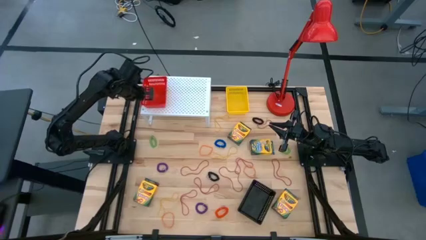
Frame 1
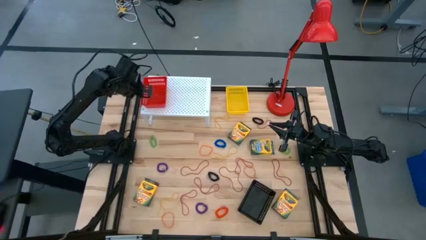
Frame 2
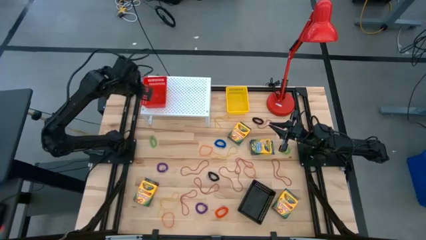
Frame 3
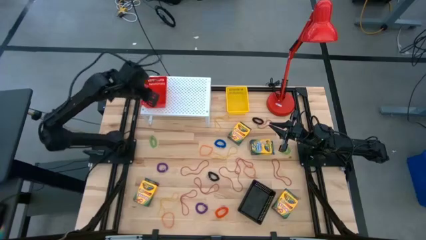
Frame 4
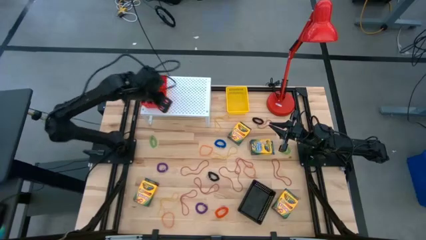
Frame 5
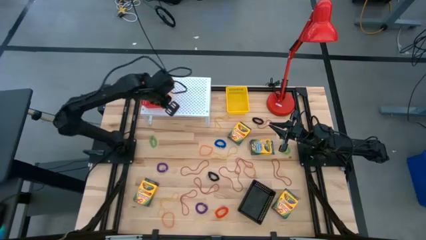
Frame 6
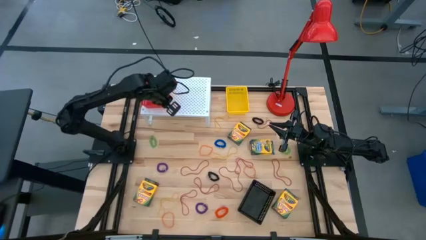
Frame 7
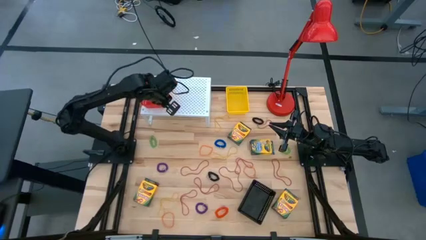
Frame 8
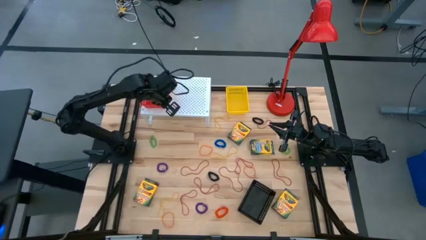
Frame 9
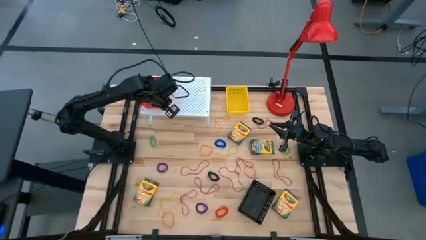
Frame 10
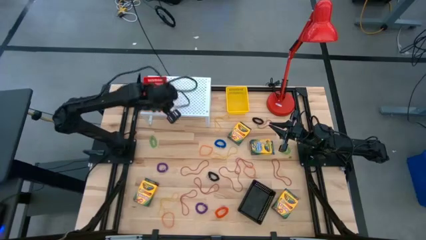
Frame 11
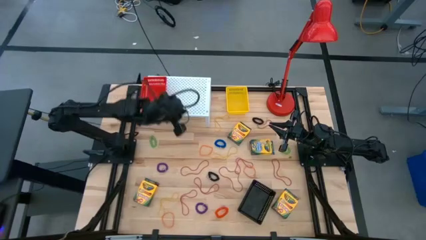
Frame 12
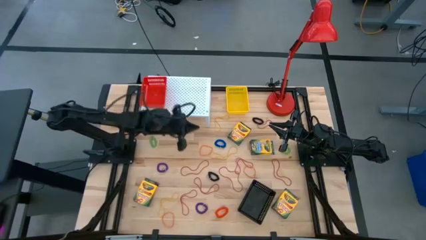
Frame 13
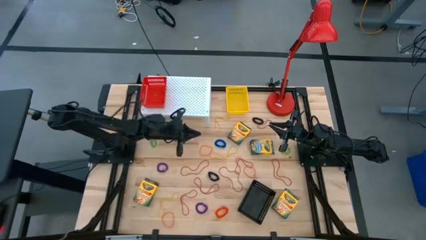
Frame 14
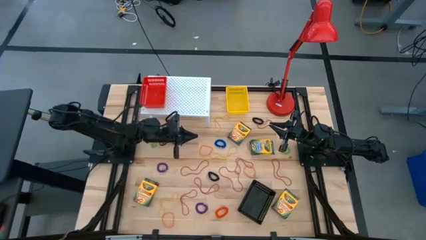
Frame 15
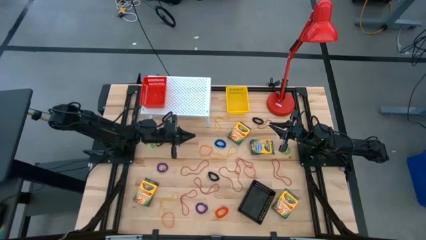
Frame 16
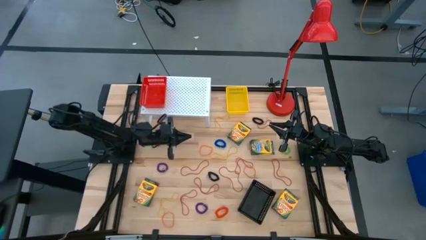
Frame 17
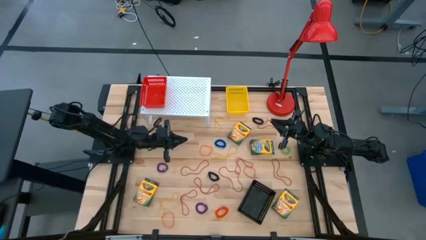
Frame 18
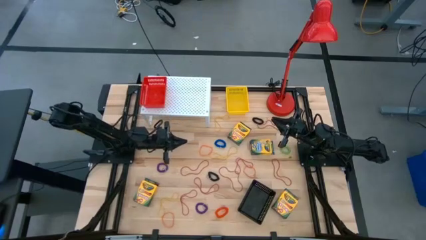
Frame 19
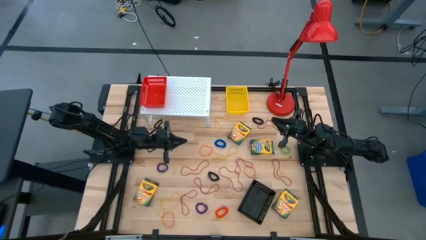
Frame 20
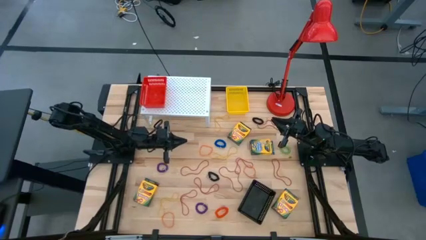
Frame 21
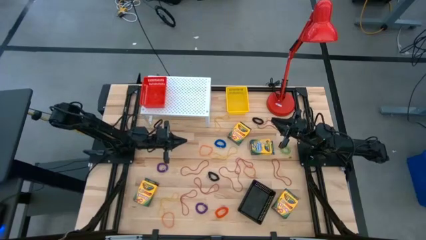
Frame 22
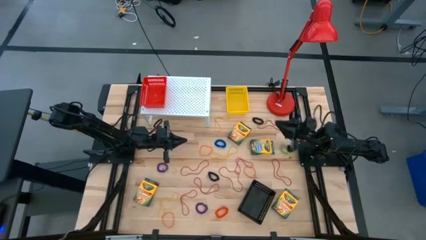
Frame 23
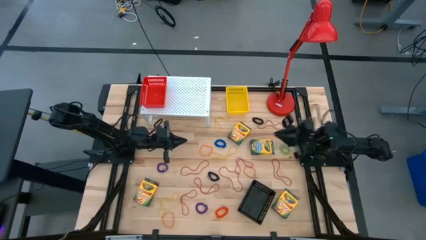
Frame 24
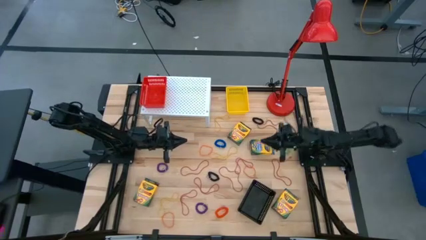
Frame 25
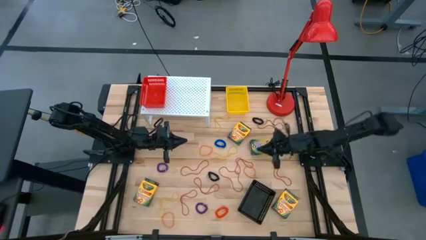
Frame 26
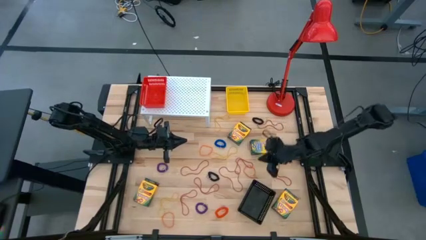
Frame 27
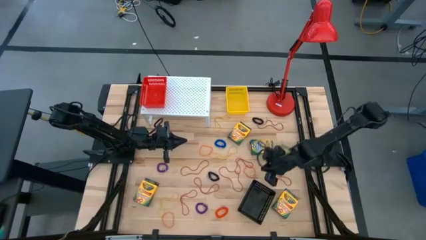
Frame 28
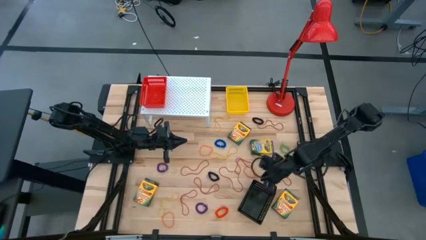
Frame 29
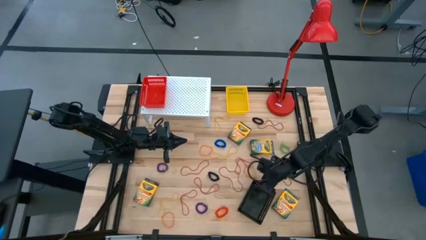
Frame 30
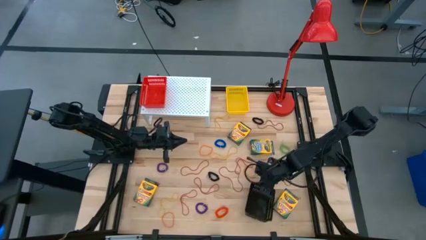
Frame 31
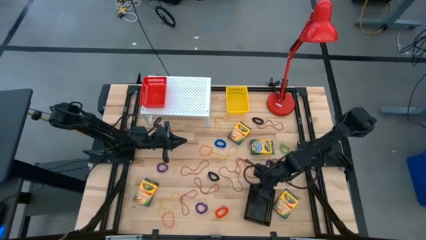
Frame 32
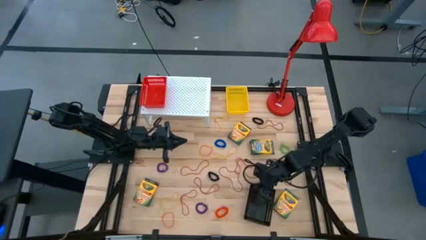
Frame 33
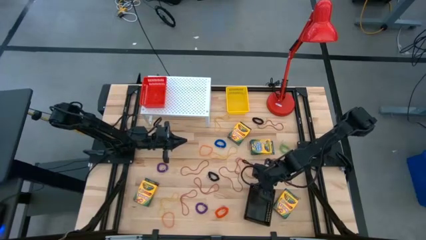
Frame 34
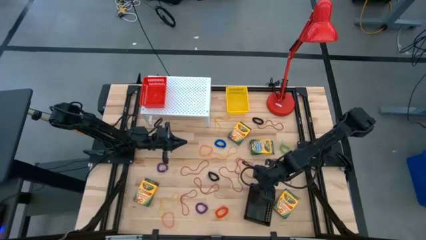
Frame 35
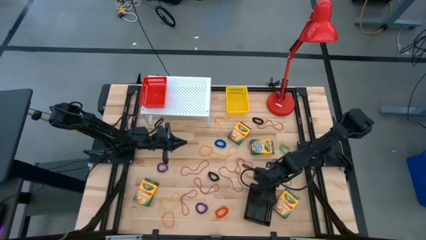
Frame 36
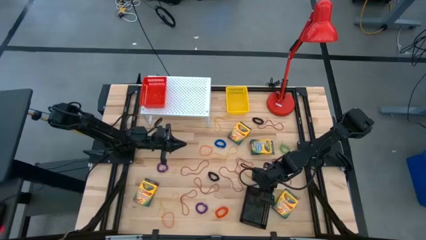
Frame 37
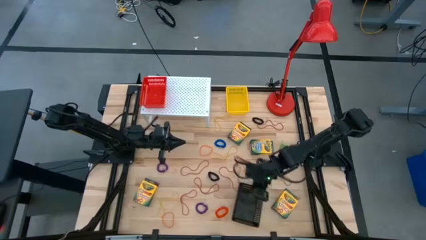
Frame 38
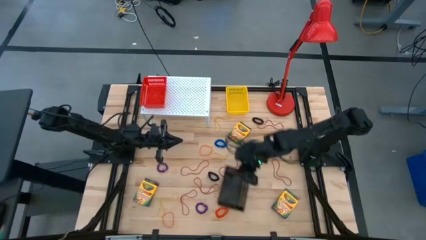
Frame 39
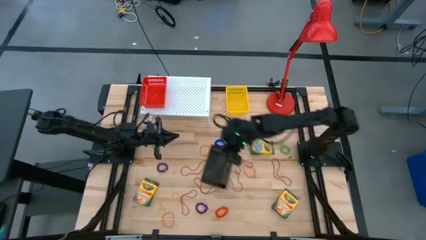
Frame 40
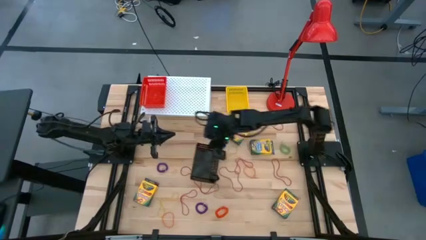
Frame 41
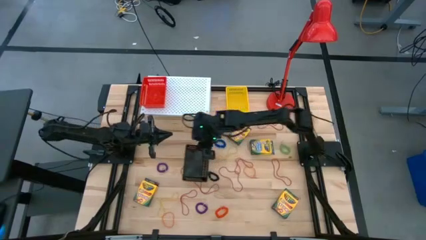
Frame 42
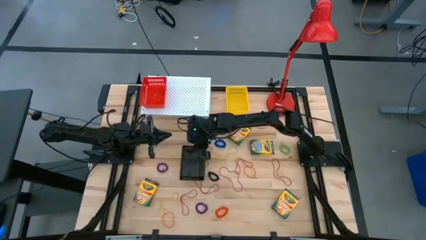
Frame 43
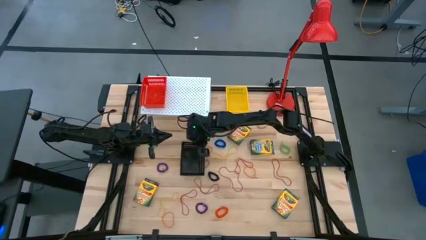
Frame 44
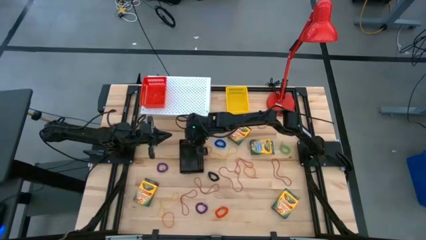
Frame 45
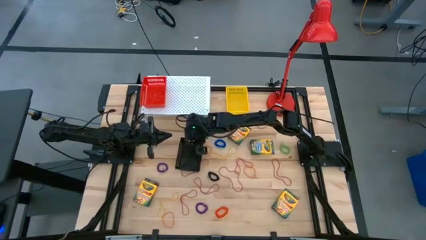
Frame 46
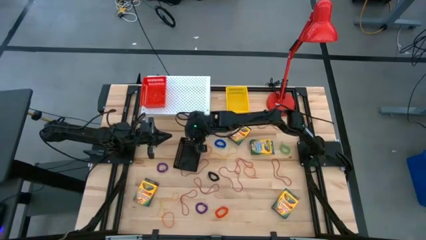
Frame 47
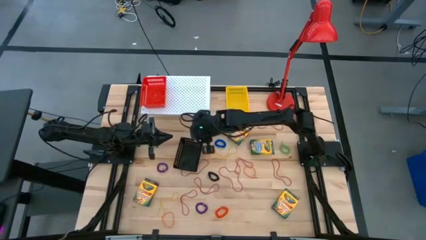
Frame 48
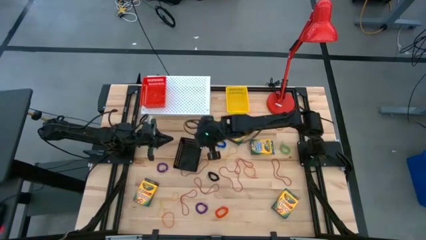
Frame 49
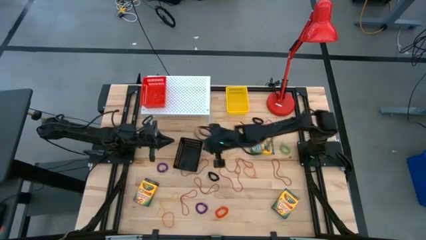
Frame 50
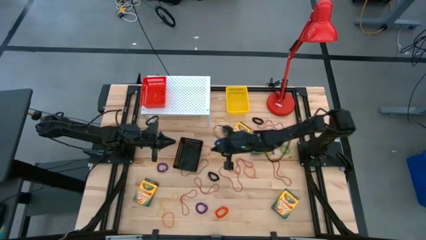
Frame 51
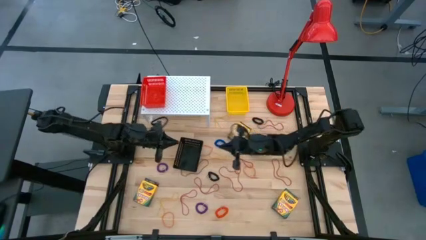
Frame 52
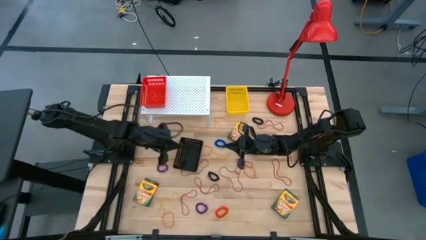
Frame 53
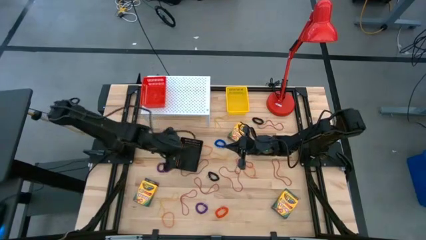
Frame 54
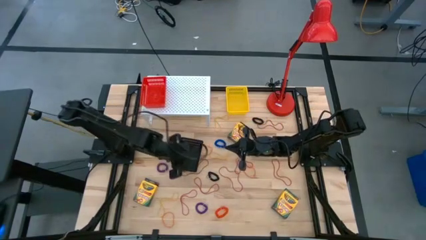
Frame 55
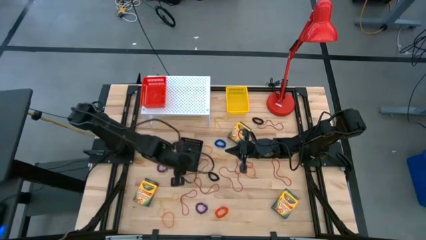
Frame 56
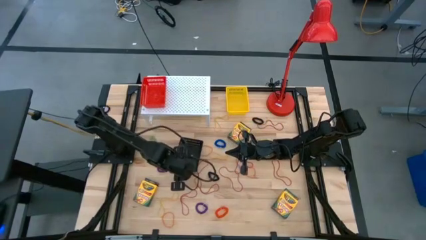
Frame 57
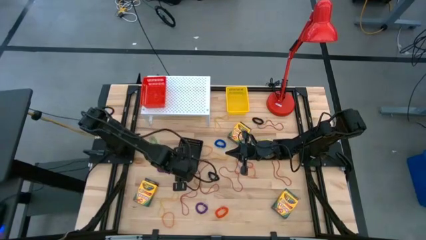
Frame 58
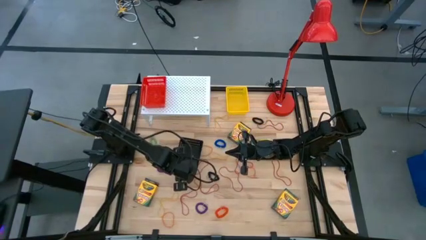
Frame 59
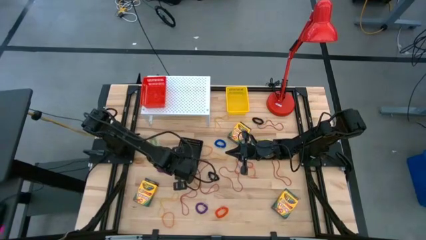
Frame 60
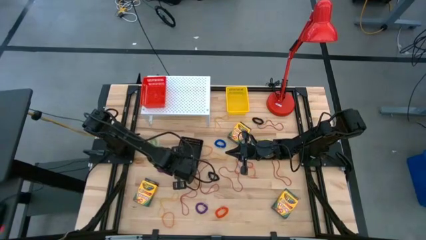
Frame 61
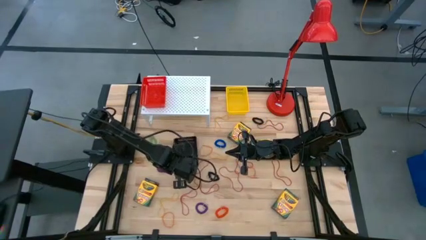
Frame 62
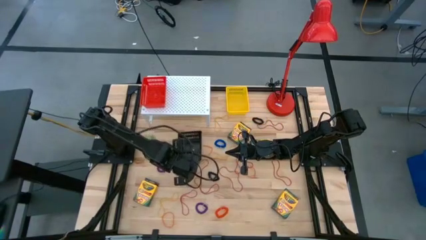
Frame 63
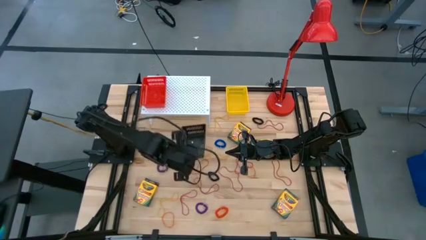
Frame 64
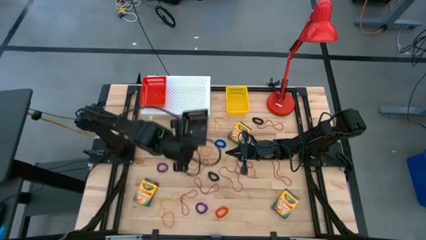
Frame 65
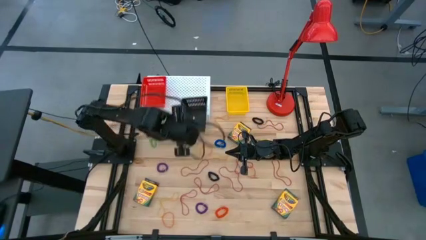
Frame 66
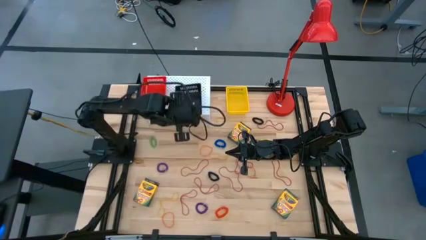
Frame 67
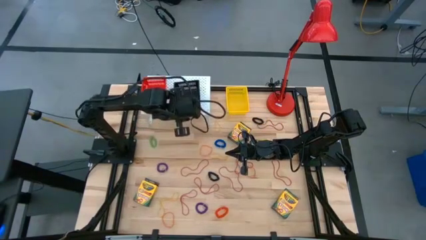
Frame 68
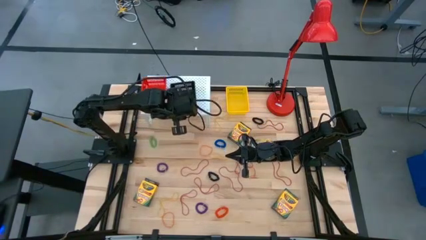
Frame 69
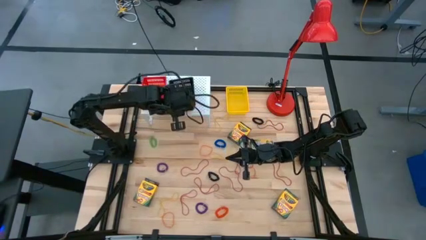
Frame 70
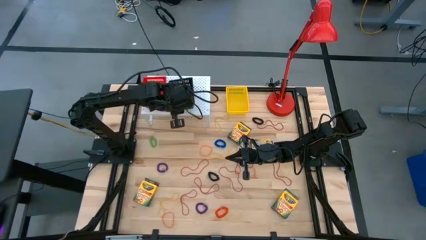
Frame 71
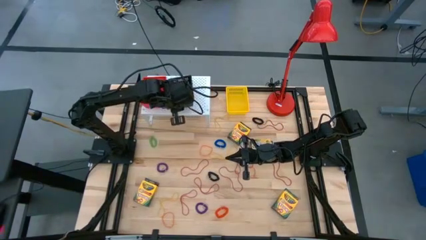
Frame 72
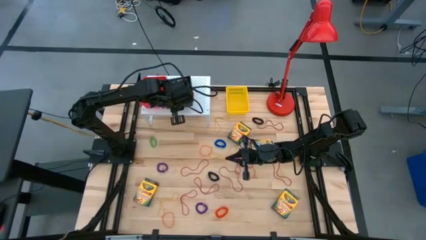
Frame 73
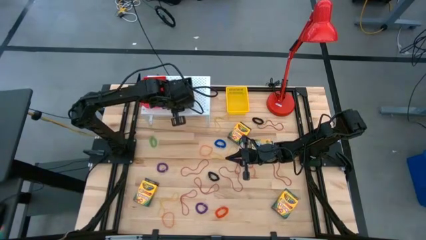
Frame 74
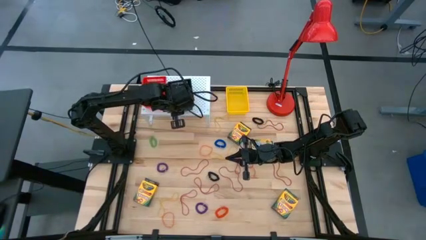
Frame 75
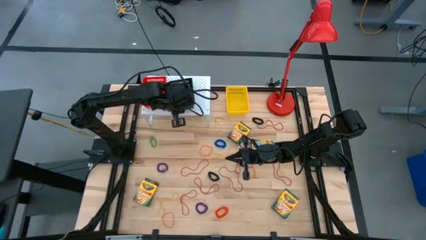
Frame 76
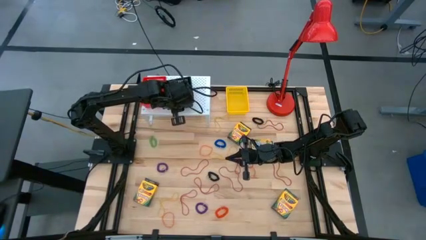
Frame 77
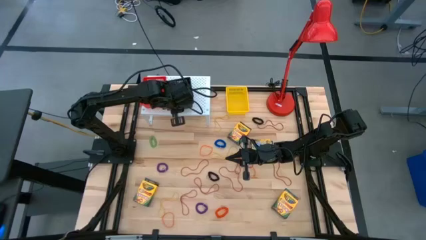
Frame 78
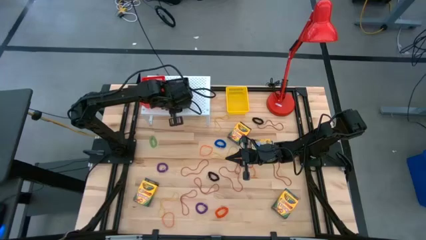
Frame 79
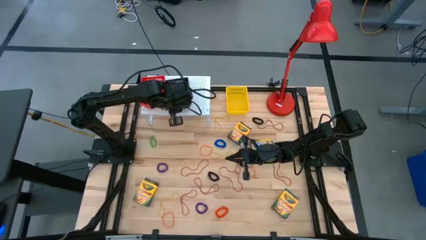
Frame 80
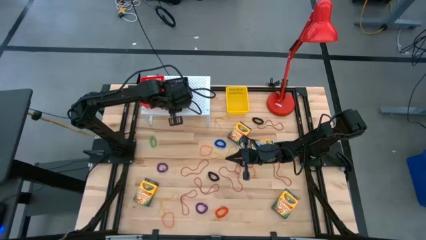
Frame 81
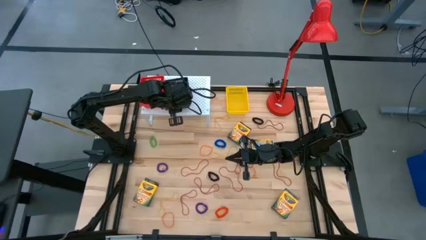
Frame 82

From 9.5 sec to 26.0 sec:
Task: Pick & Place Office Desk Supplies
Put the black bin on the shelf
